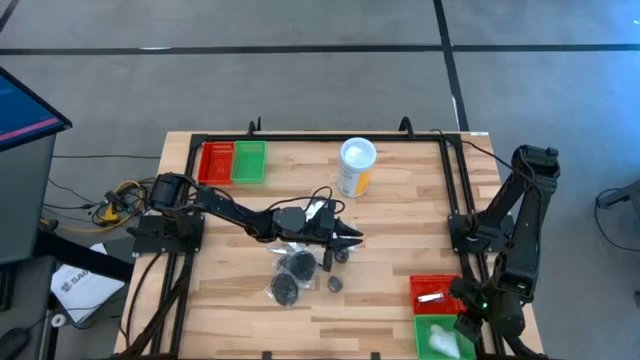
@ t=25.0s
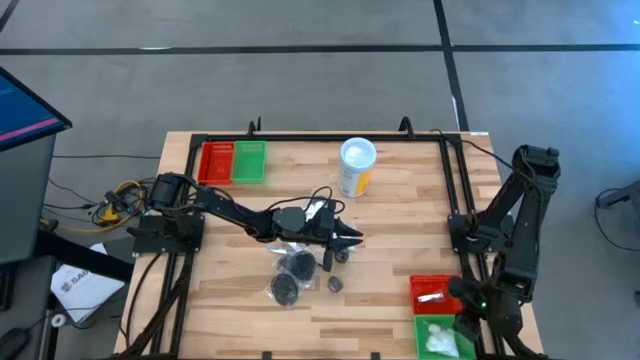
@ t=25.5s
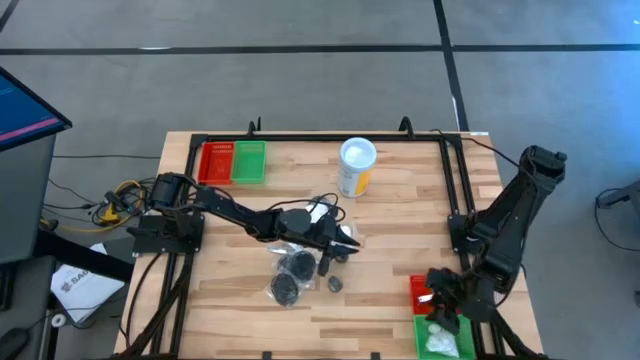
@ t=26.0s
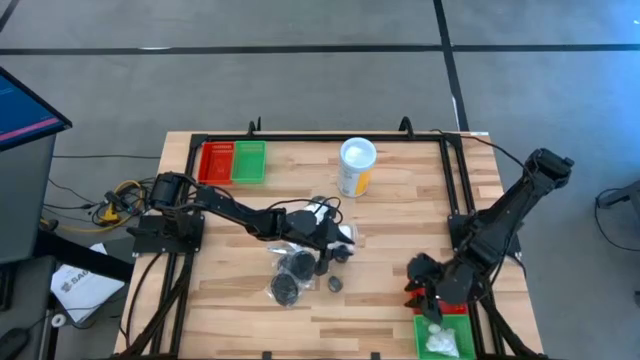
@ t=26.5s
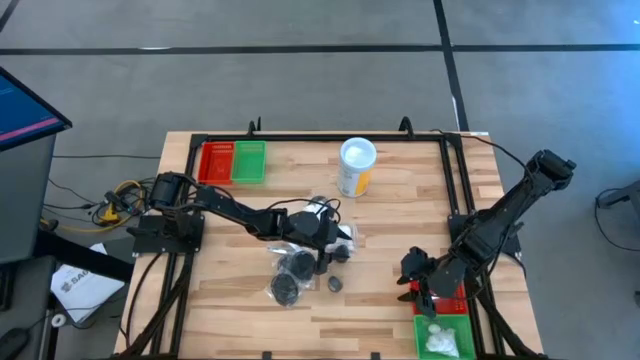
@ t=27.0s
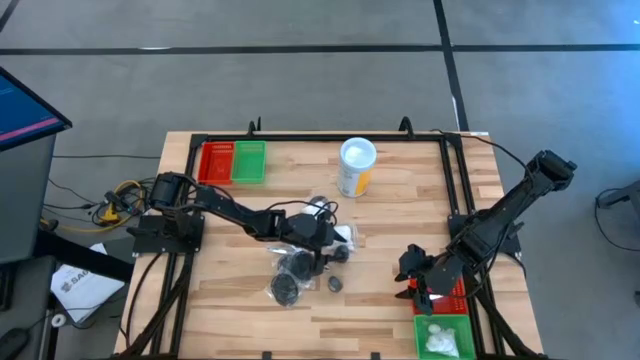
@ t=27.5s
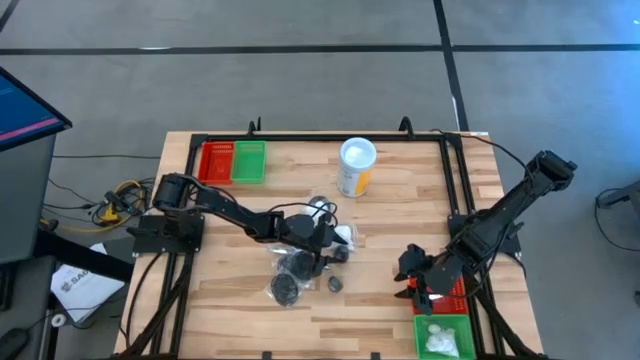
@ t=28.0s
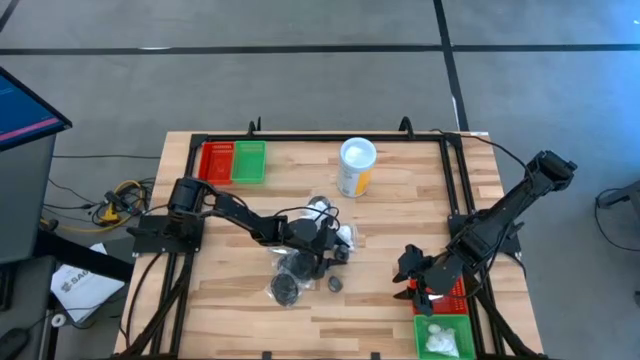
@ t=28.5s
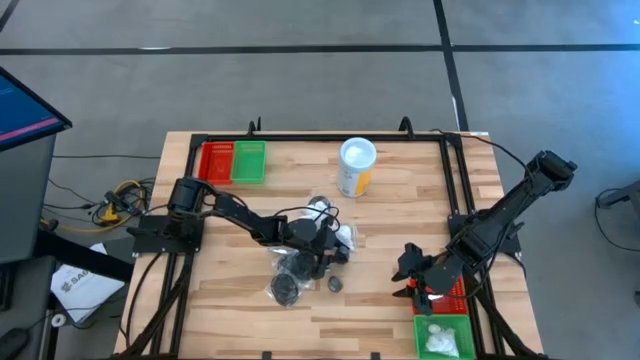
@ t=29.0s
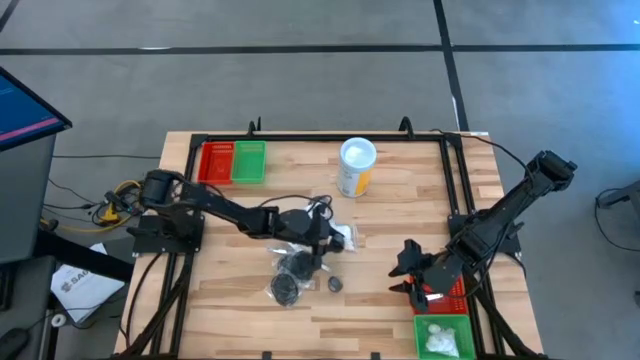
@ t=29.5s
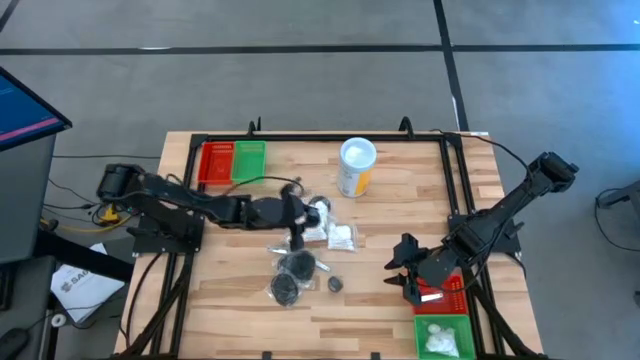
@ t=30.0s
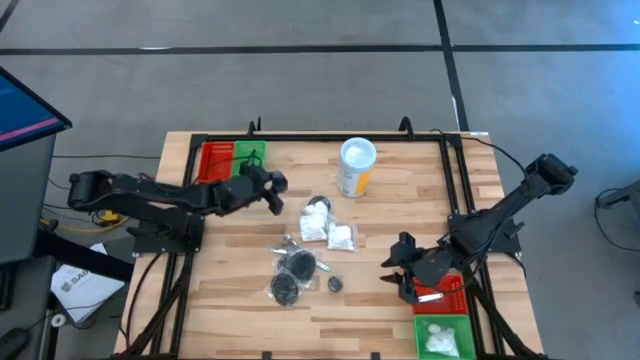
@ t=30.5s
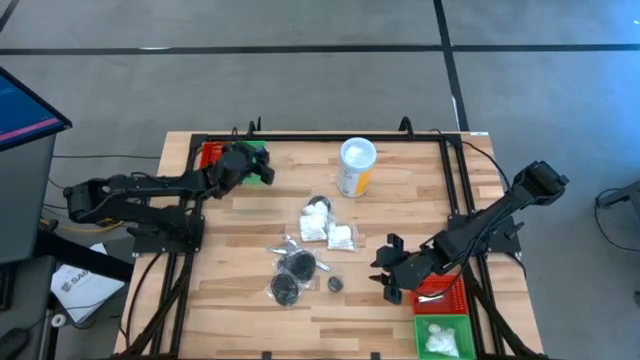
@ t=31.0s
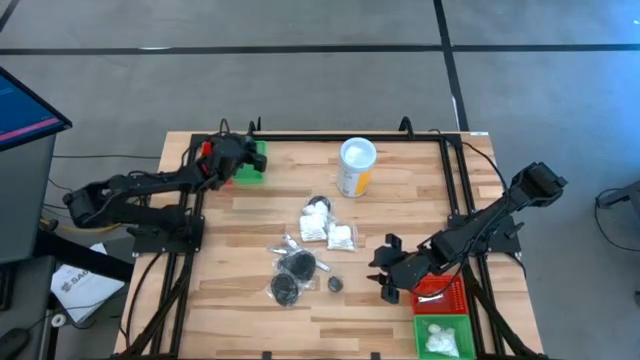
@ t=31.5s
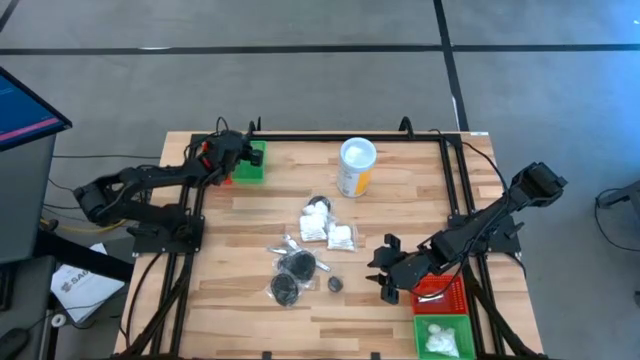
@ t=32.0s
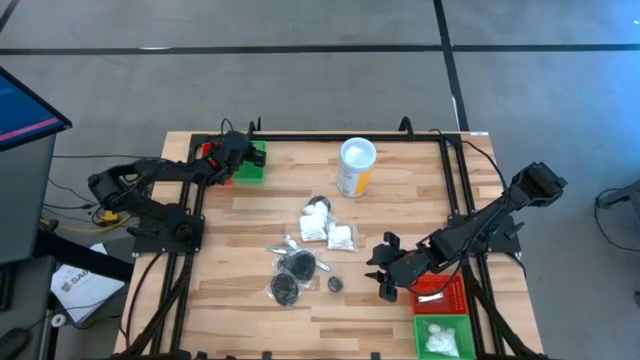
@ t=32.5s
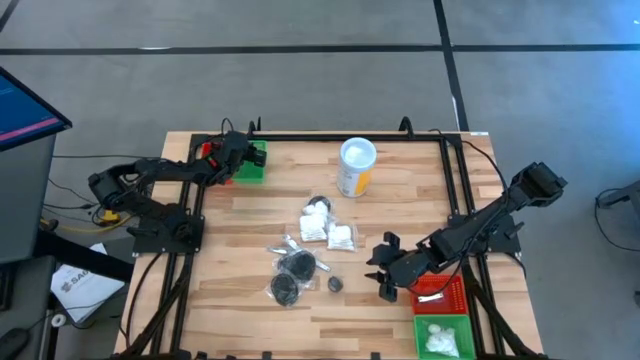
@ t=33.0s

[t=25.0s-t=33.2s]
Task: Pick & Place Travel size toiletries
Put the black deodorant bottle into the top green bin

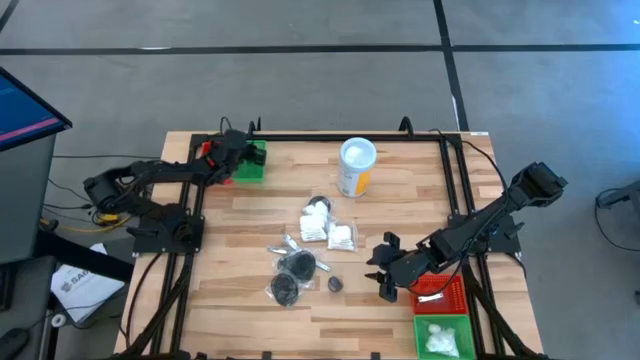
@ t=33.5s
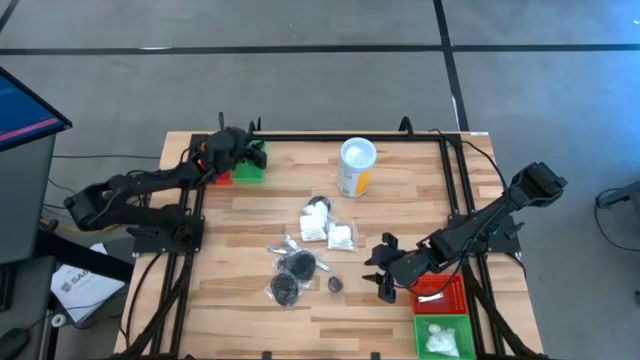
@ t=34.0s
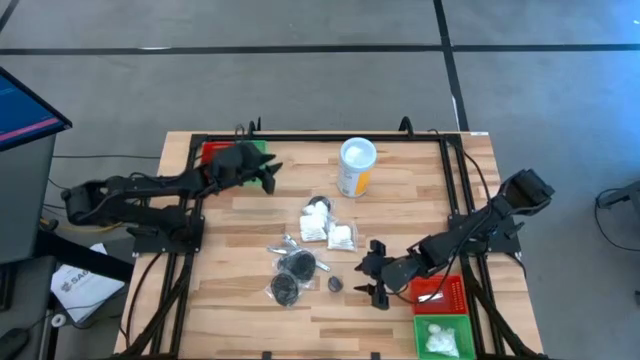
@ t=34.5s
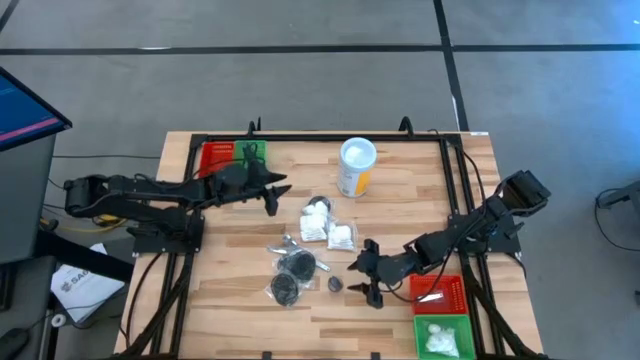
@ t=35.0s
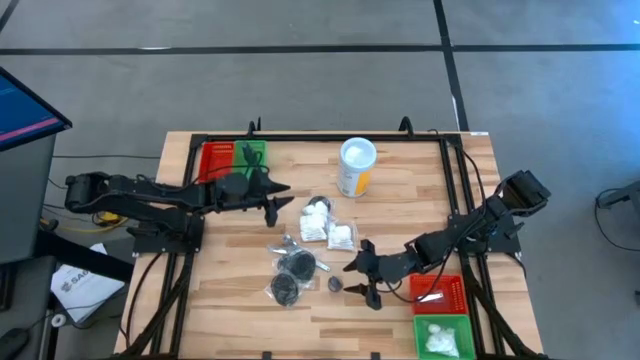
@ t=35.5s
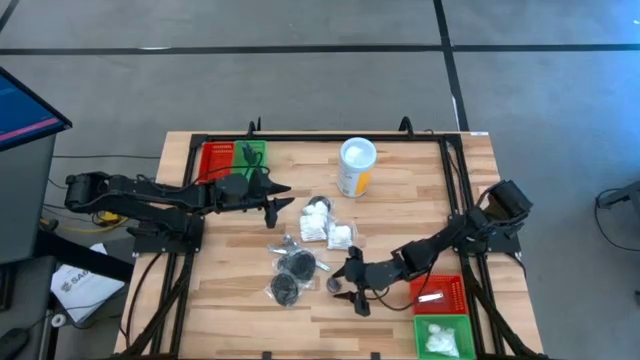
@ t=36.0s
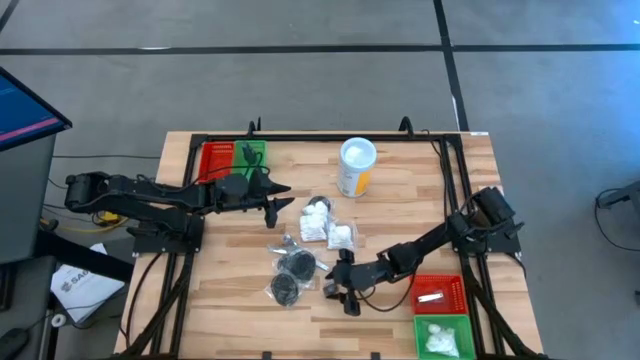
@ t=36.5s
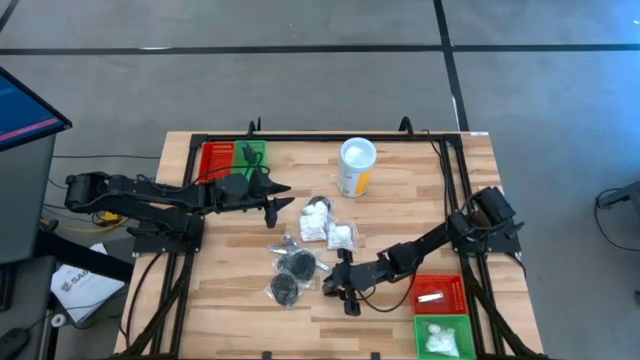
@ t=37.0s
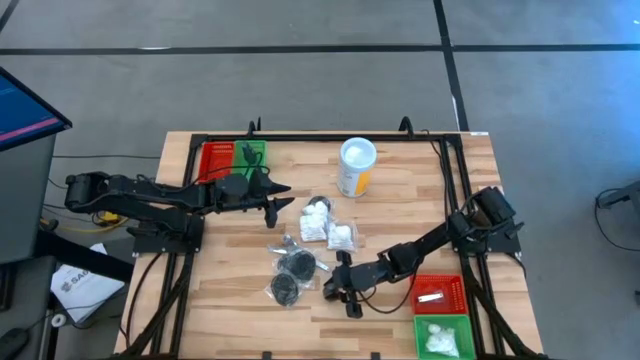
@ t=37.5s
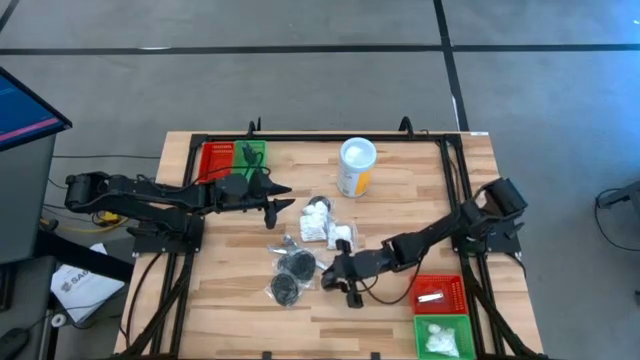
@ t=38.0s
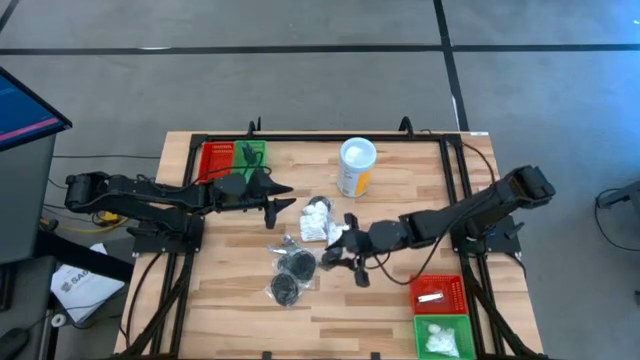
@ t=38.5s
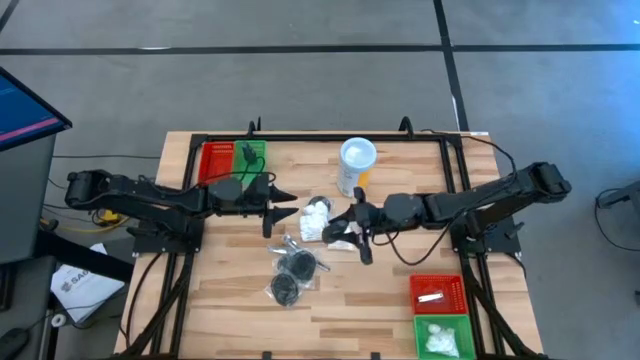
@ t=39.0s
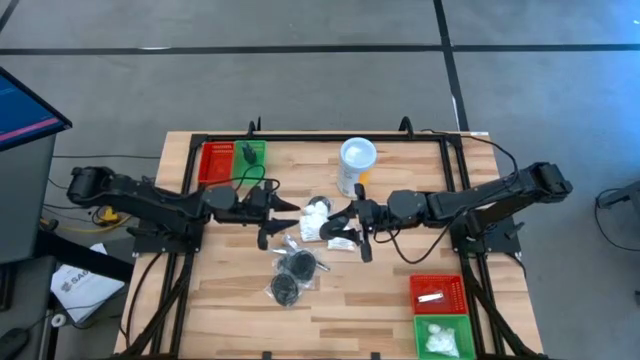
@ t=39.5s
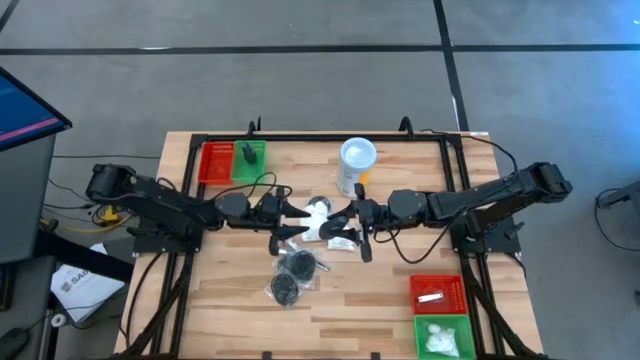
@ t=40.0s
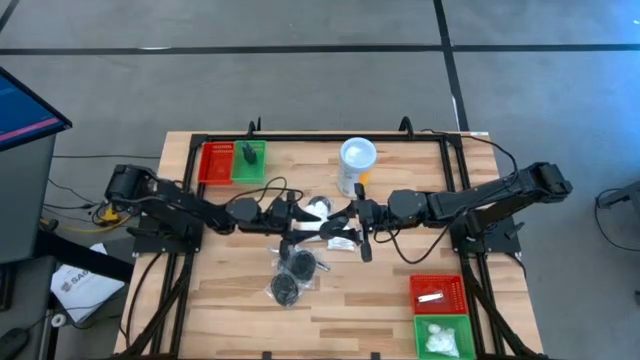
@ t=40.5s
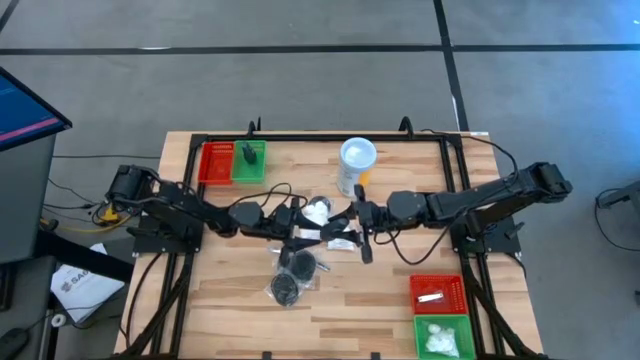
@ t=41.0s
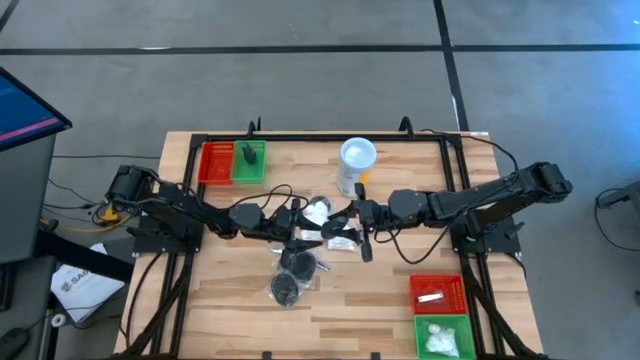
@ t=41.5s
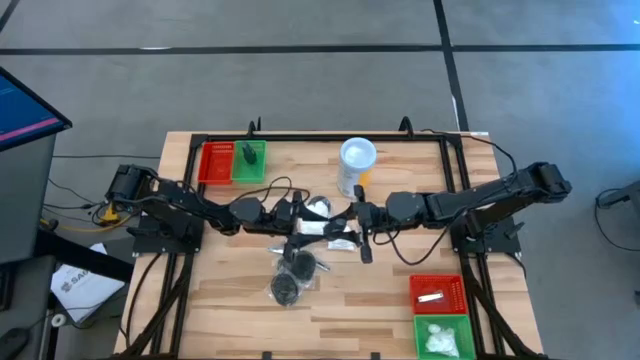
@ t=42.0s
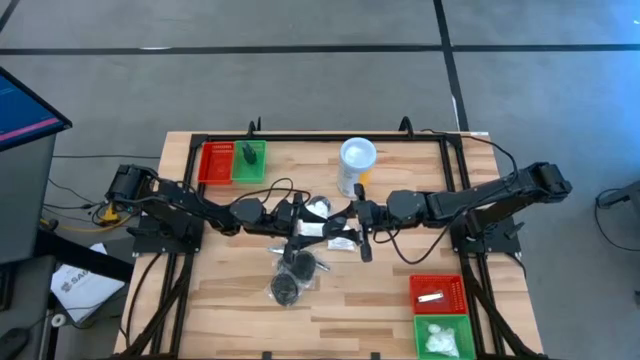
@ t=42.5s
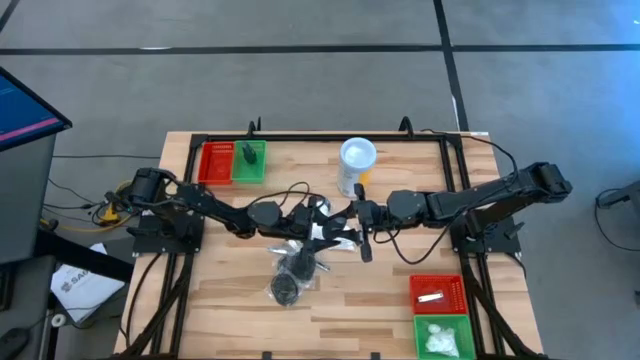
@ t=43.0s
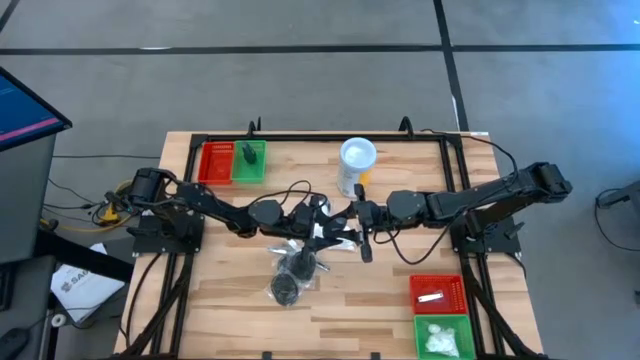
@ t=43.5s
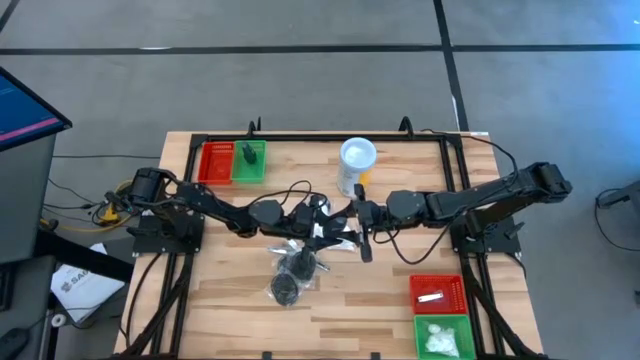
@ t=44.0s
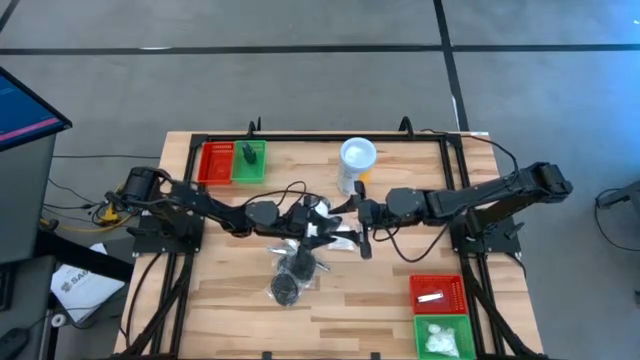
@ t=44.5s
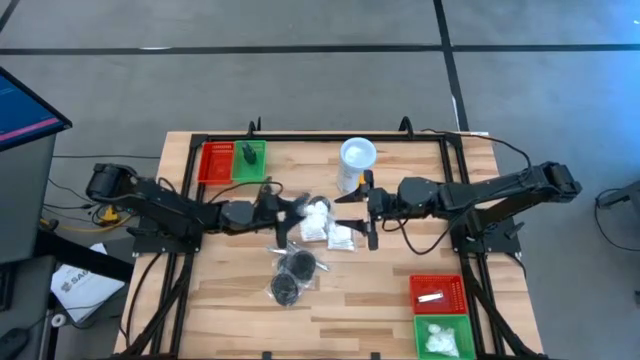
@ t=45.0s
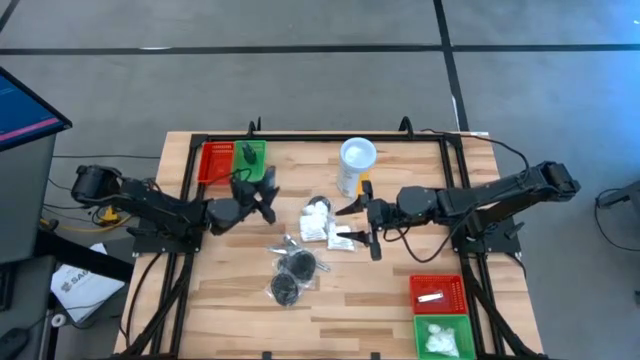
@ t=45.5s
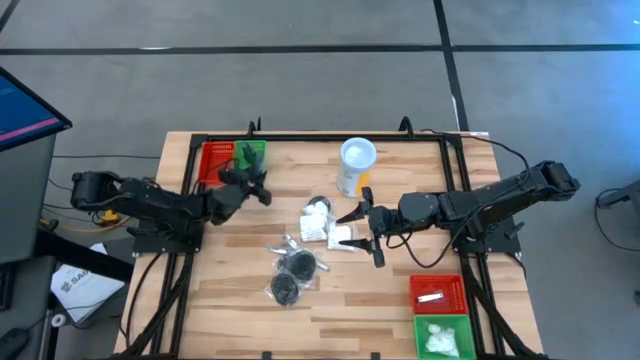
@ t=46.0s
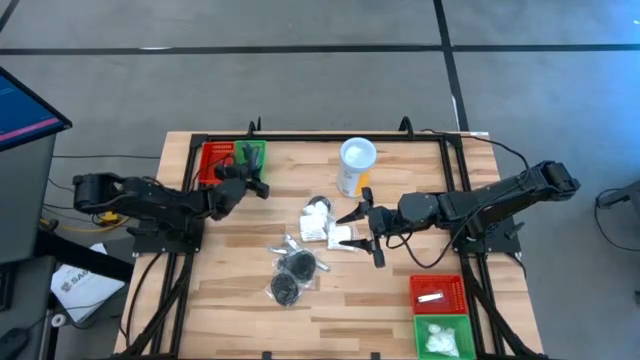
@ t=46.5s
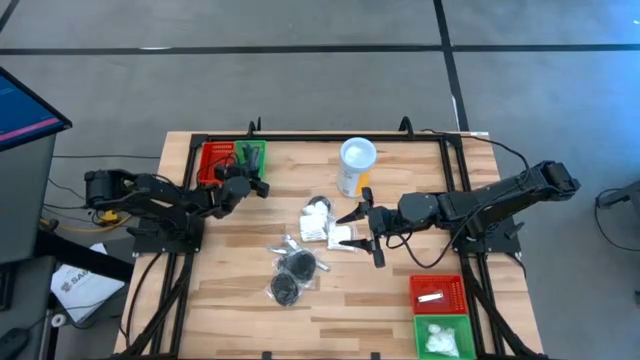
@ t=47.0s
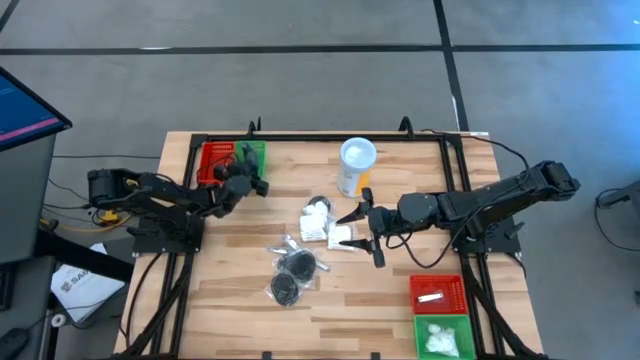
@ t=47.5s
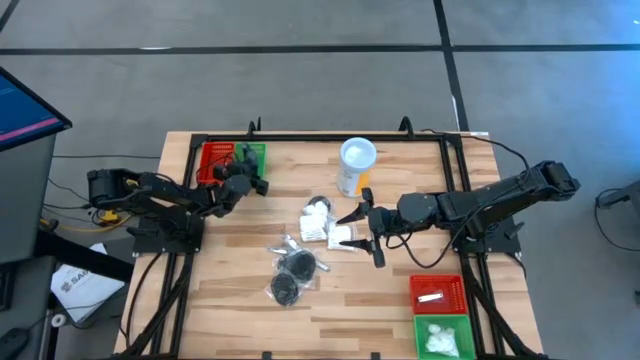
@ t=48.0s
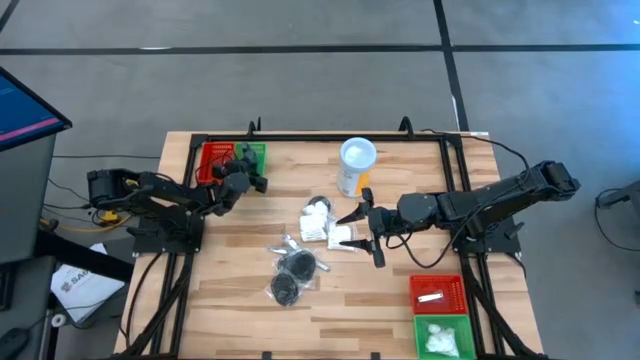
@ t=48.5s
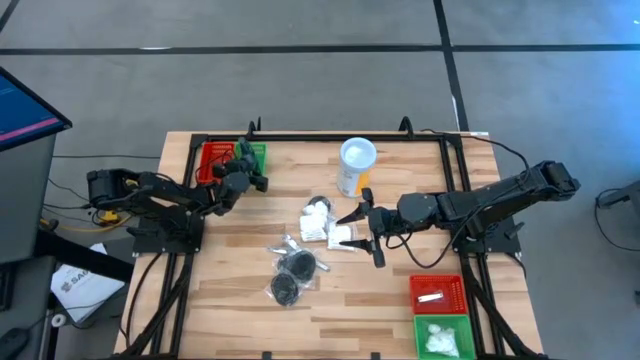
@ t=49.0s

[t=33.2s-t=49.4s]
Put the black deodorant bottle into the top green bin
